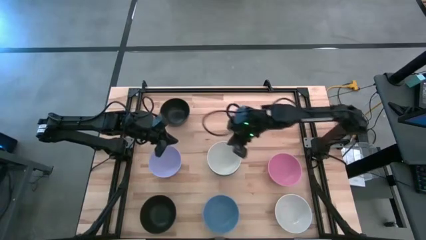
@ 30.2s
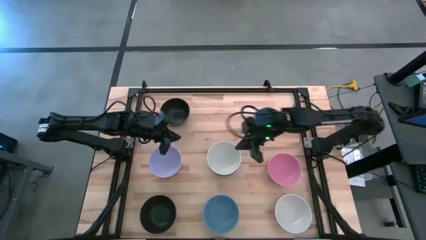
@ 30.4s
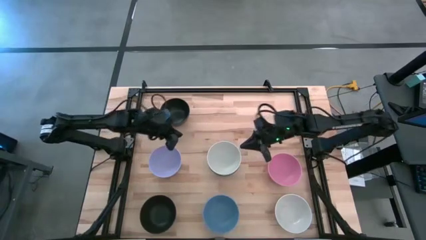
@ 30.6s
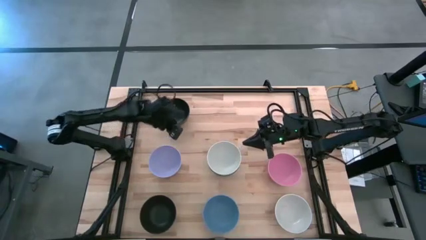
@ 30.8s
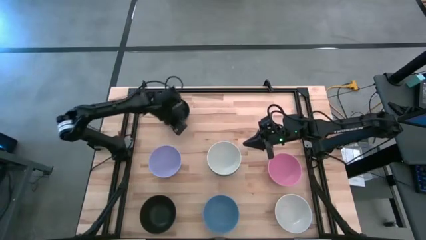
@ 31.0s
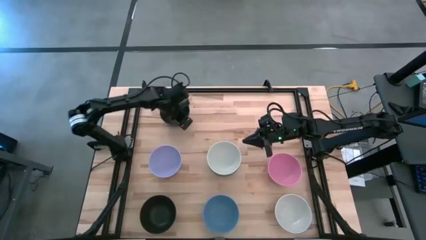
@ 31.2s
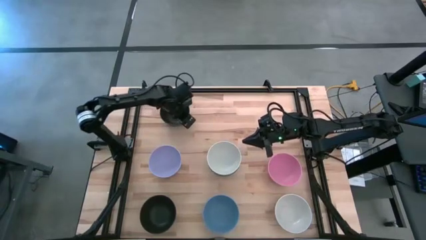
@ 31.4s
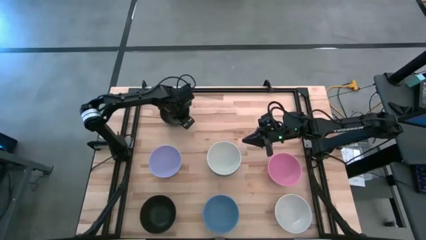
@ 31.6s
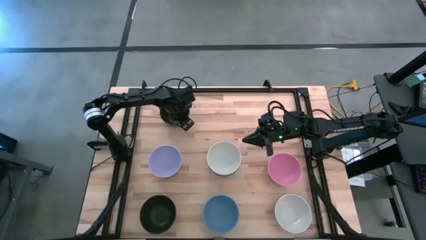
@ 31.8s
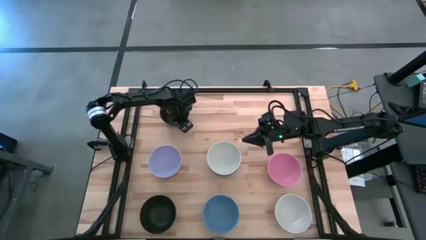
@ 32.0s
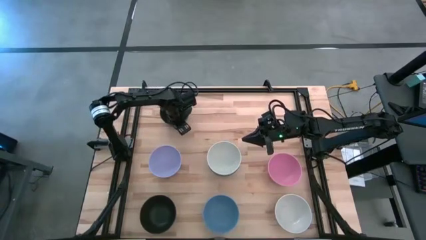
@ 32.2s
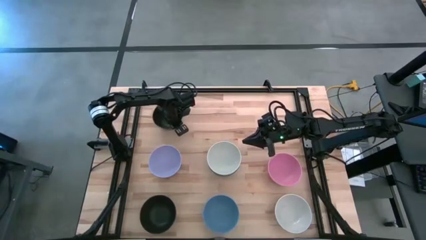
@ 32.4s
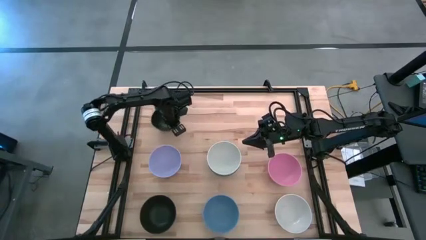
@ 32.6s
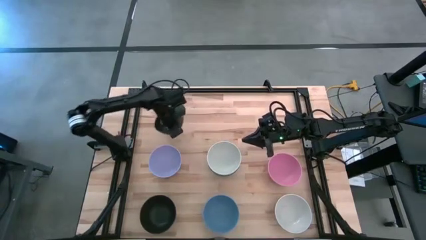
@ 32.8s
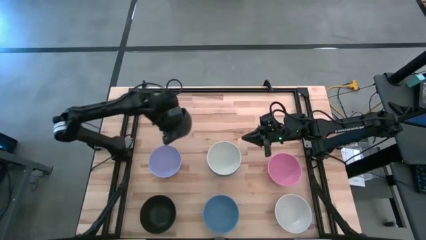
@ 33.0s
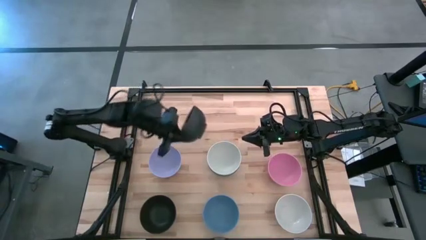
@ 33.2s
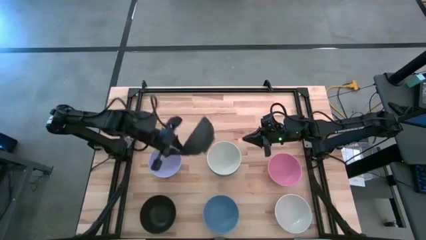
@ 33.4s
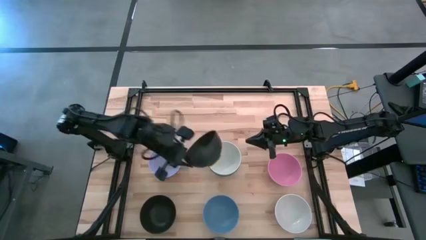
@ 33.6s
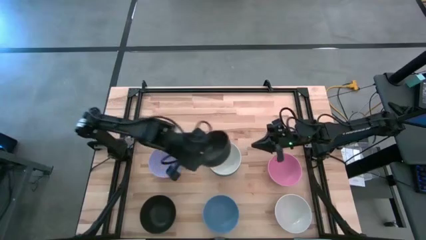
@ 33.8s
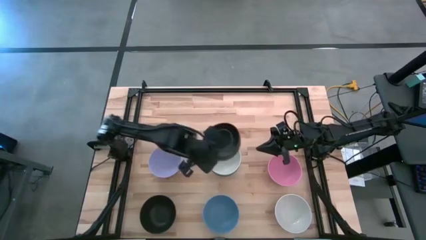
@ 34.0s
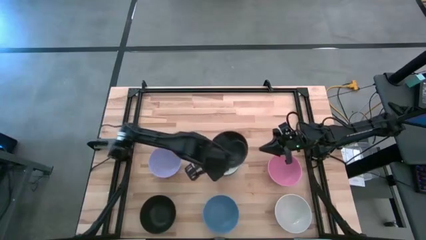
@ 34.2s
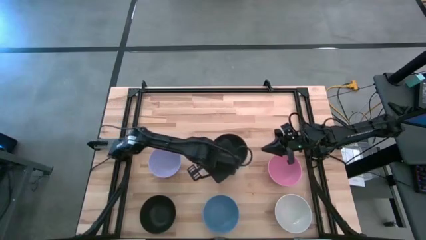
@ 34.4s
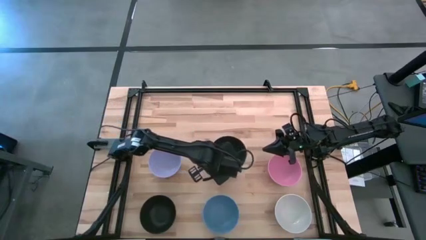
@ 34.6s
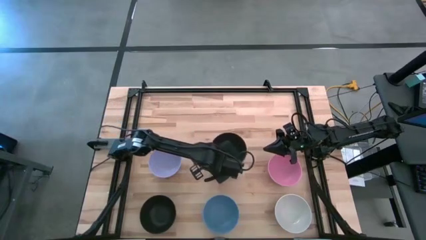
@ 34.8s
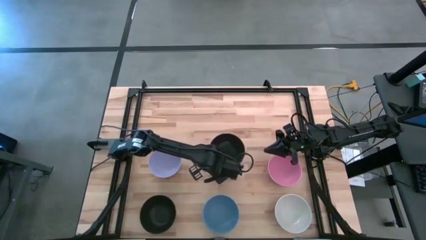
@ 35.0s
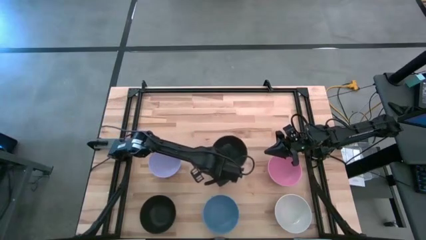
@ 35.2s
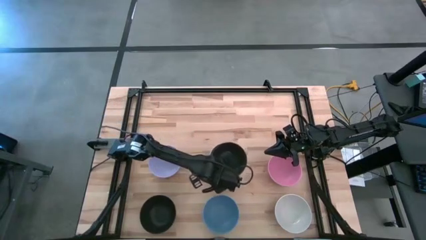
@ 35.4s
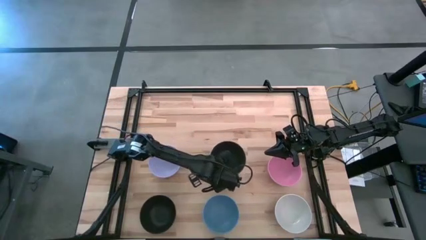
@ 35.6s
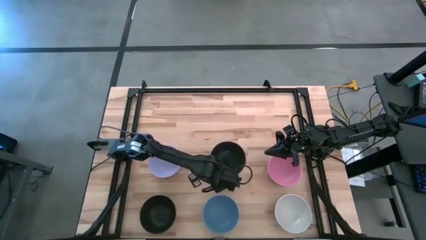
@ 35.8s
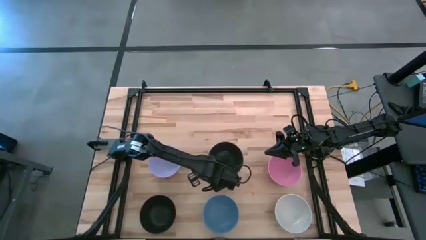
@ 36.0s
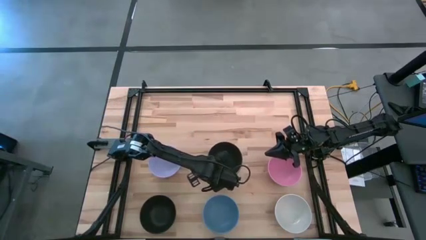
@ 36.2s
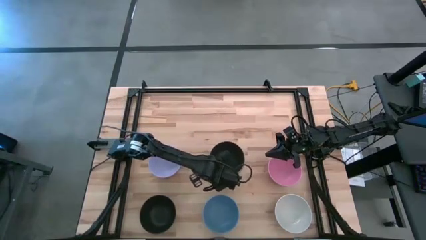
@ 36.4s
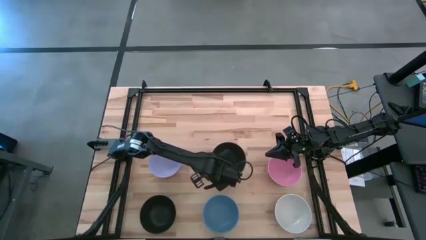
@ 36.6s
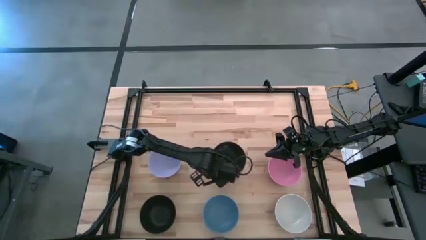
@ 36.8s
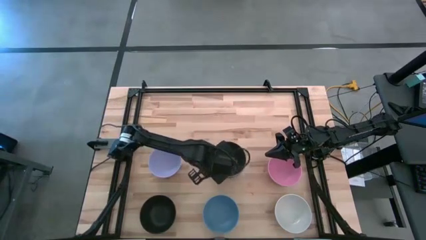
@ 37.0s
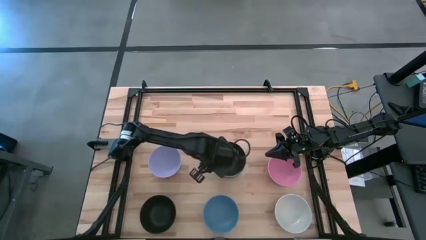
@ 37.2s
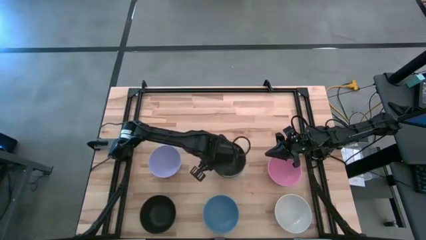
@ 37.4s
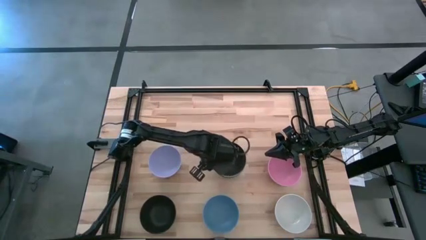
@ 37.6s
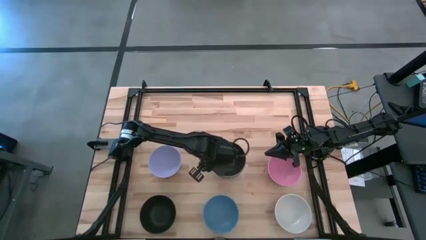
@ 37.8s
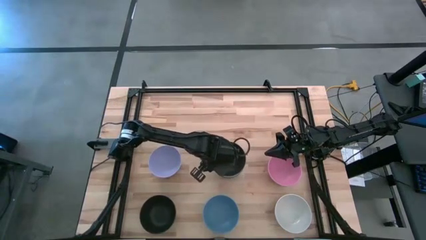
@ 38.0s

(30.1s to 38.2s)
Task: Nest bowls inside each other
Stack the top black bowl into the top white bowl

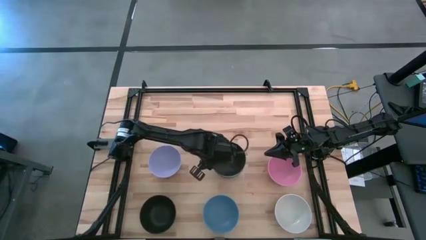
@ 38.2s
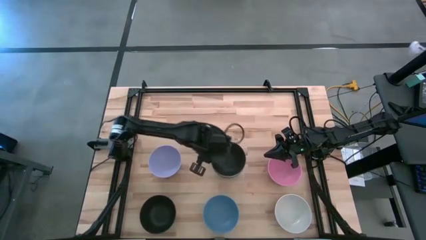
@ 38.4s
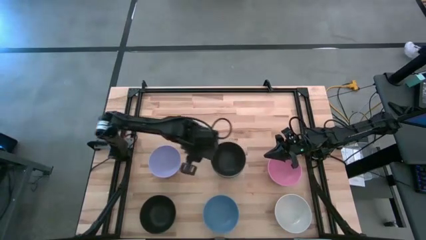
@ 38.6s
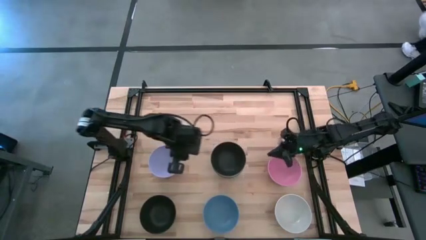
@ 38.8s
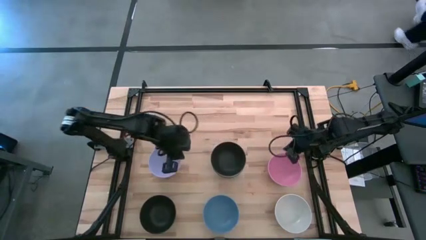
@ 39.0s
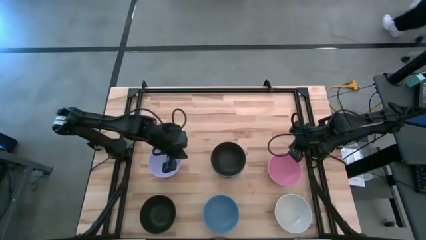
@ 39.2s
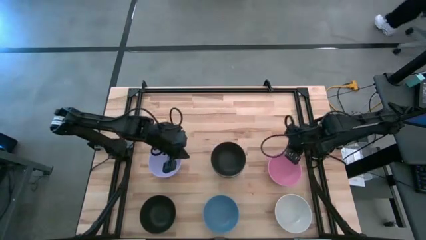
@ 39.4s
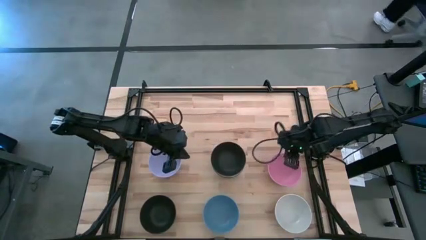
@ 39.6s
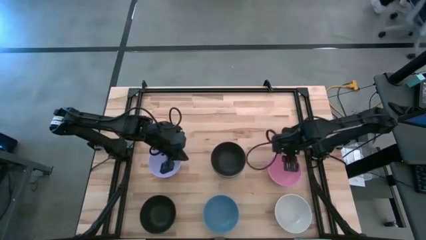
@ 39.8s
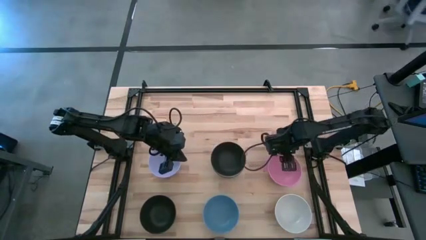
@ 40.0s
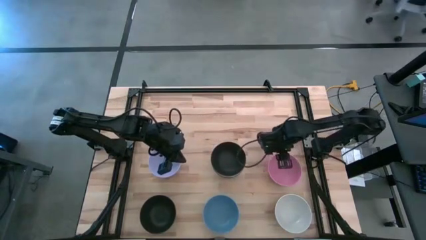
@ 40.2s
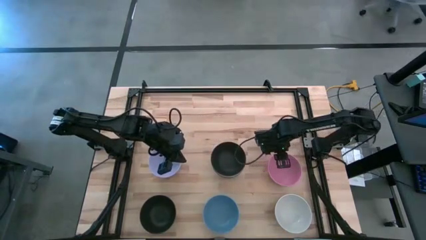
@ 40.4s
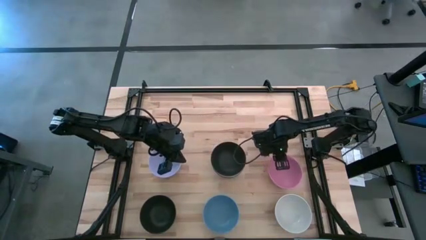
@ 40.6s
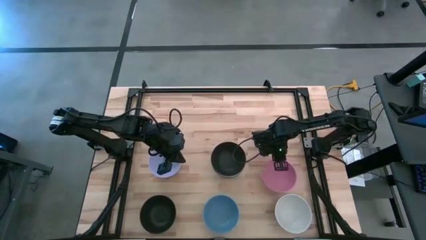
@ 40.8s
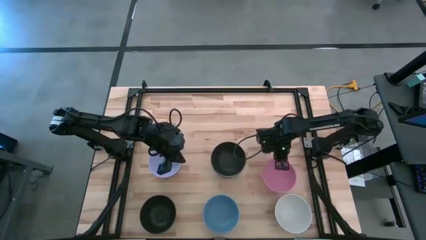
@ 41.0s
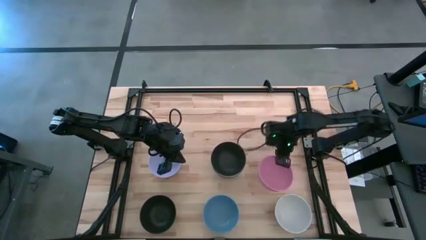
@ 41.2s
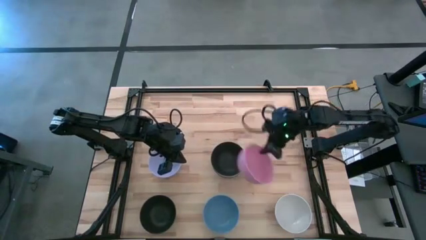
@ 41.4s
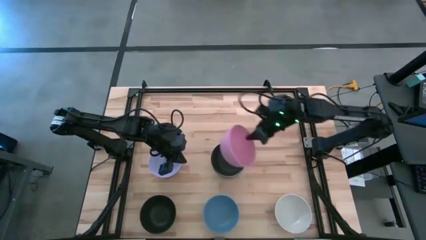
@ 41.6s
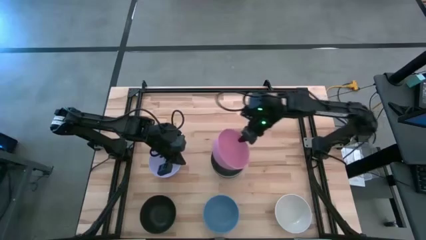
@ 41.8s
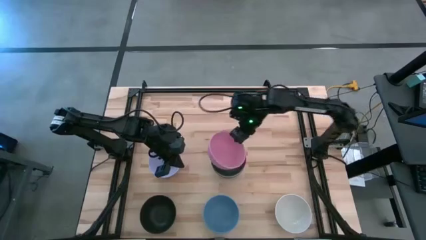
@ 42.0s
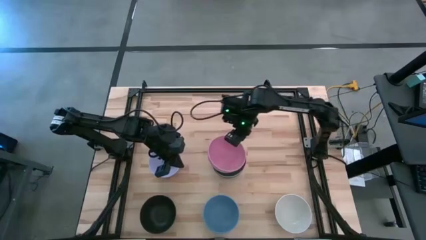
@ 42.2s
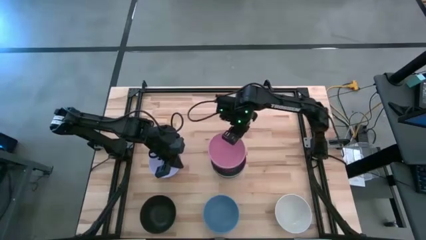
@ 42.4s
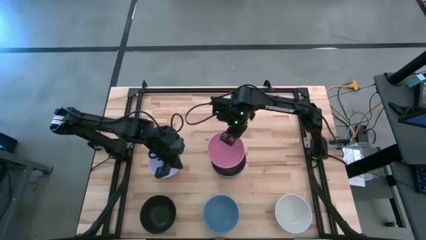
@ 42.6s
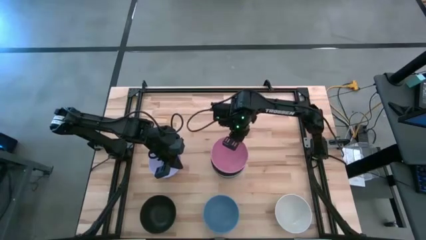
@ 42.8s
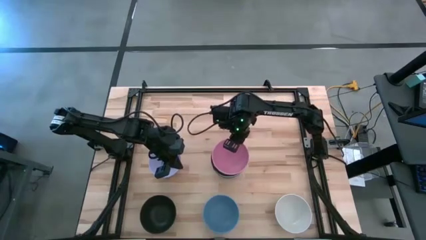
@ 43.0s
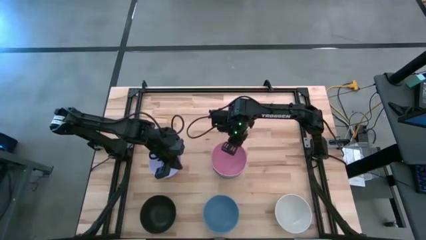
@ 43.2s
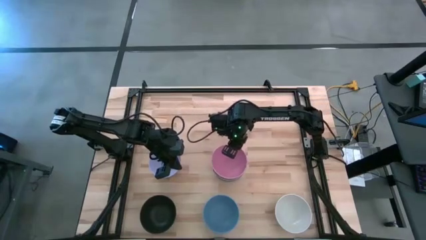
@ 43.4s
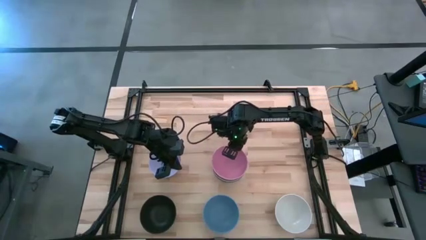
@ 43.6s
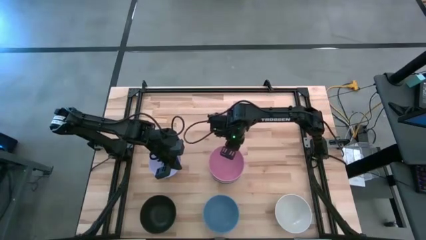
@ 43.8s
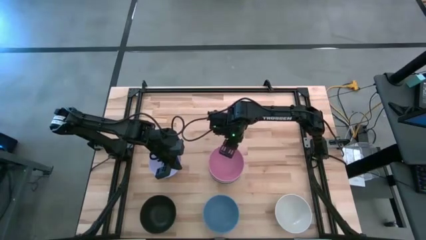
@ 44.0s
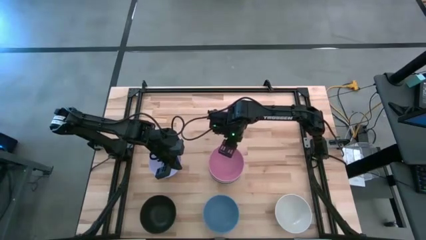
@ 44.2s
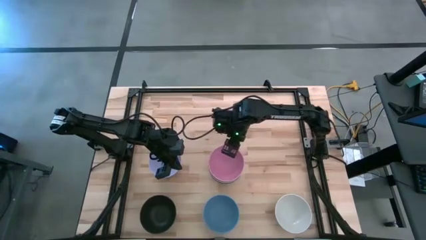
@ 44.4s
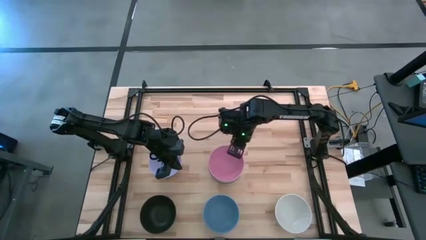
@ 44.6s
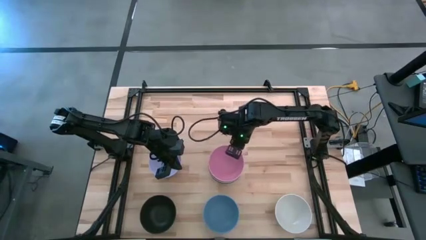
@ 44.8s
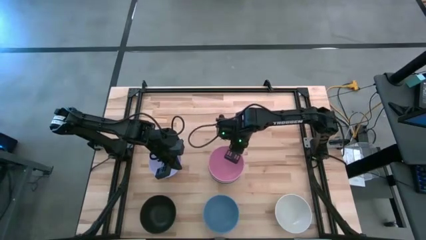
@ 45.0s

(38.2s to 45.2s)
Stack the pink bowl into the top black bowl
